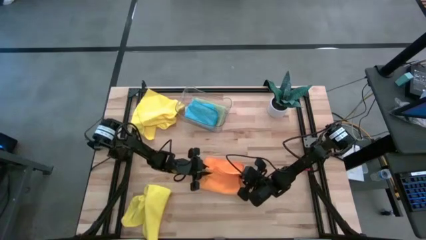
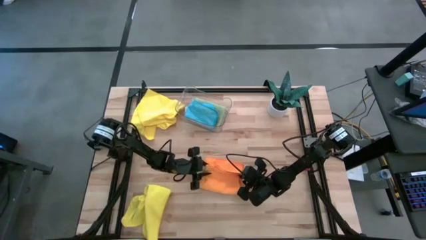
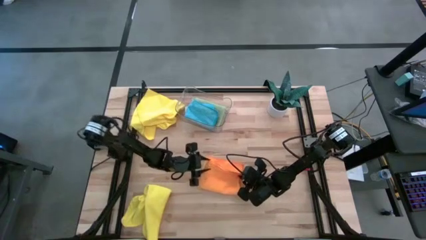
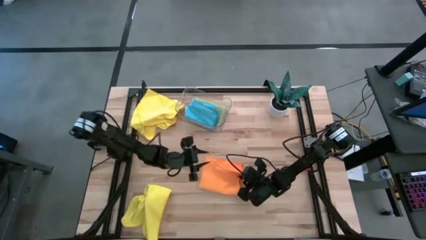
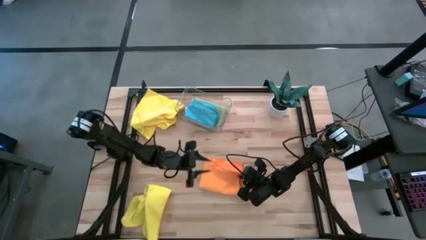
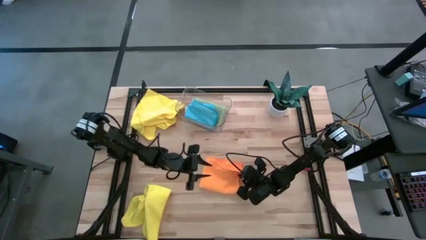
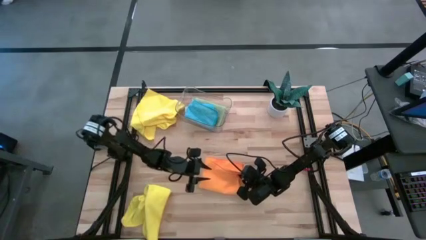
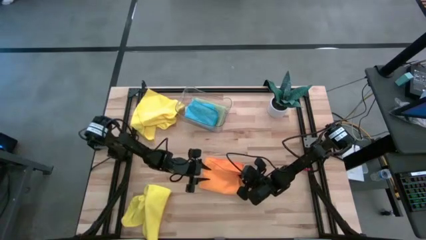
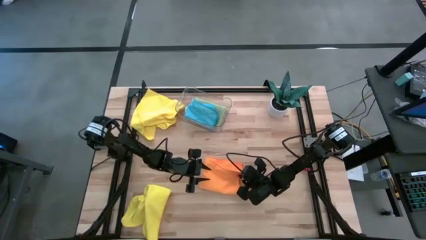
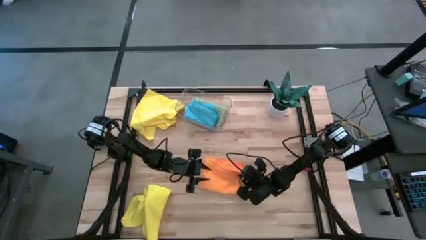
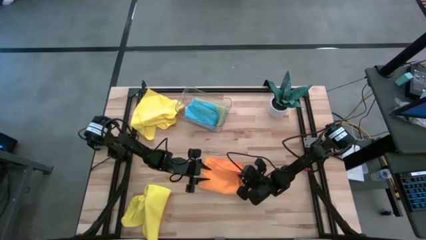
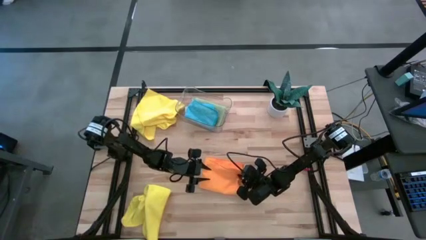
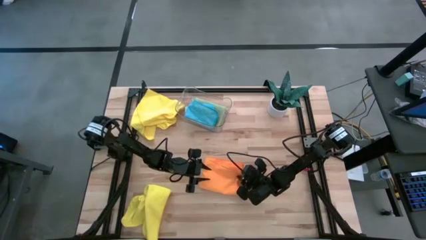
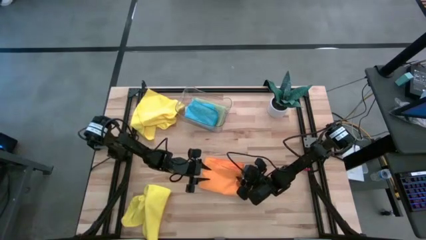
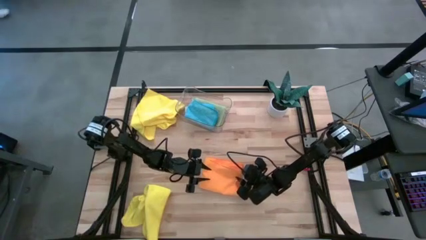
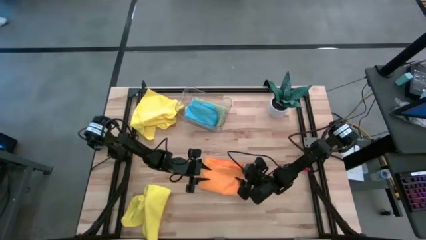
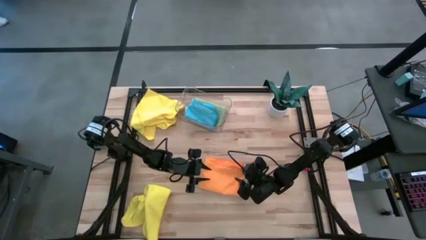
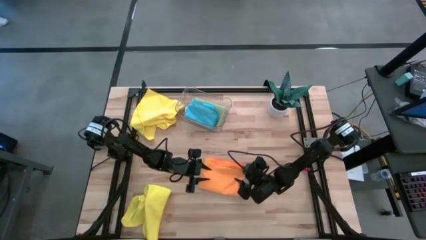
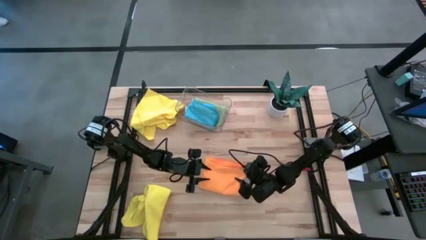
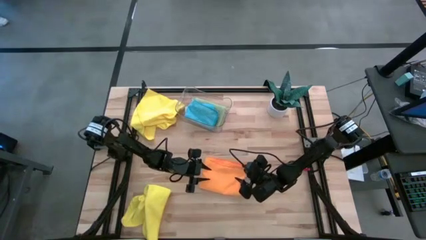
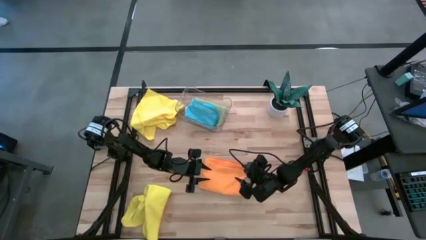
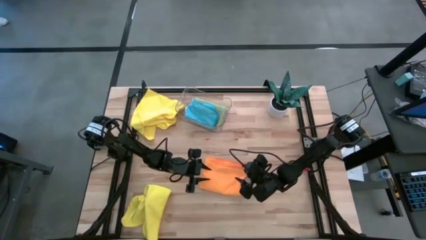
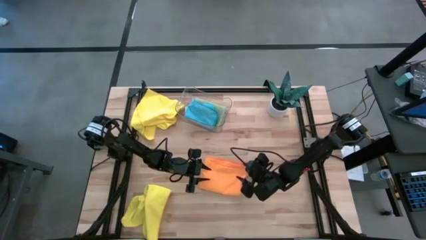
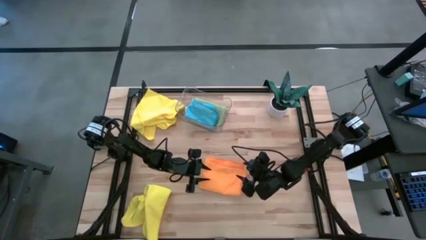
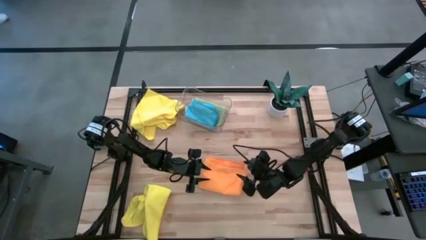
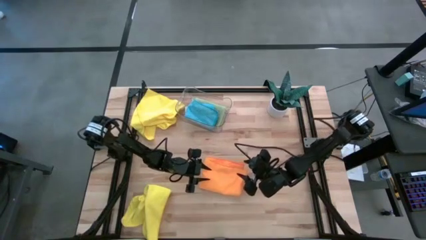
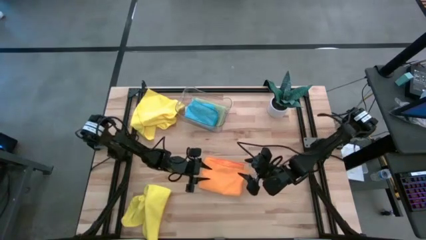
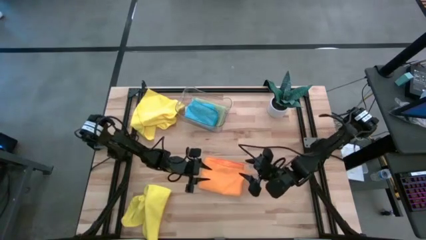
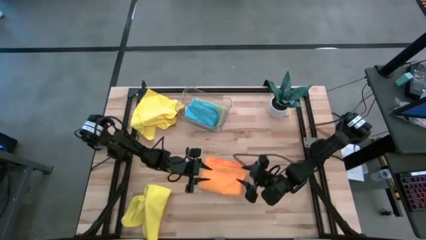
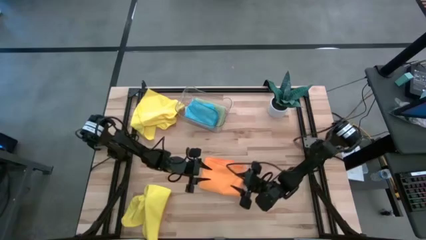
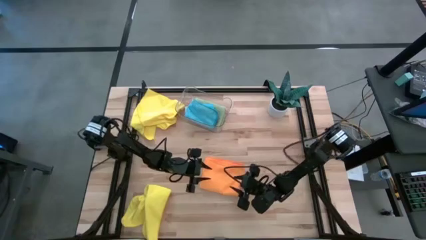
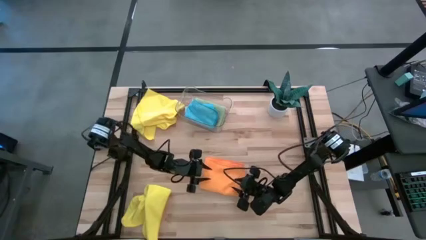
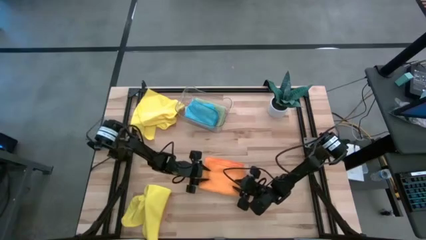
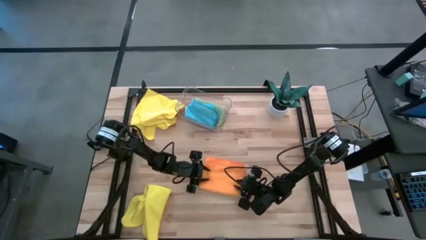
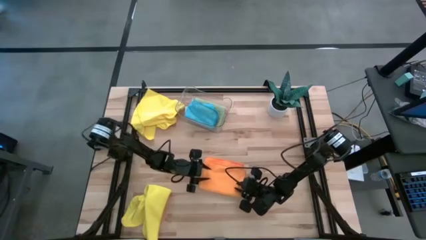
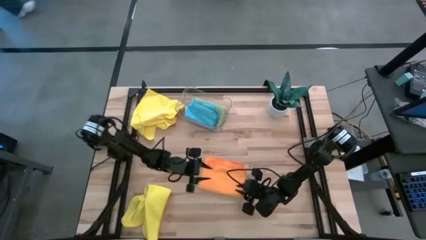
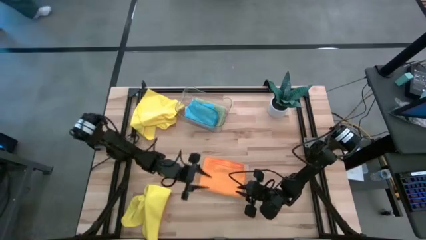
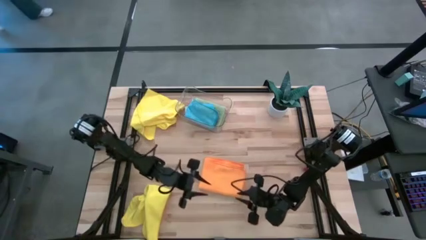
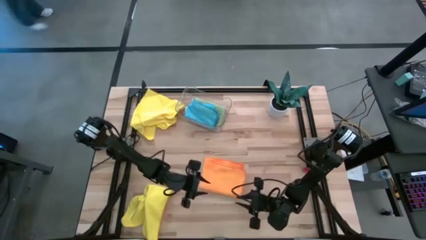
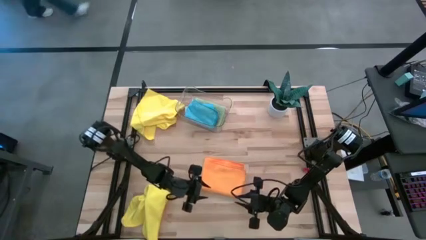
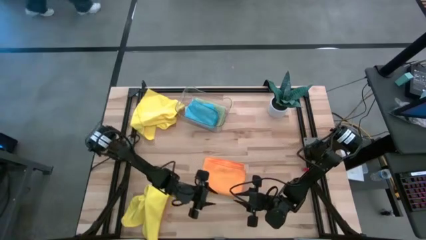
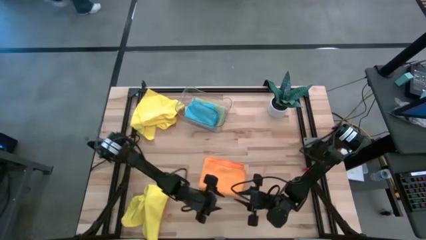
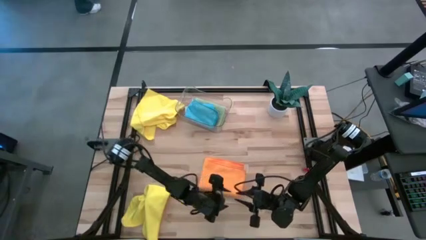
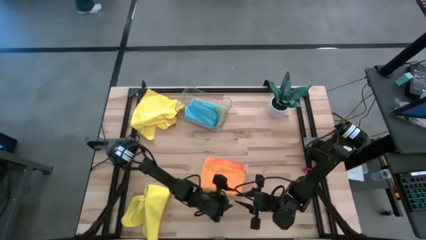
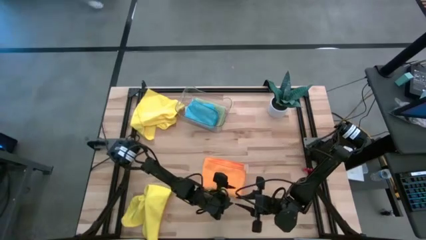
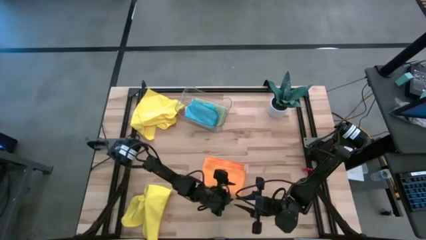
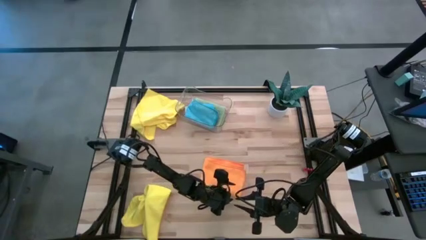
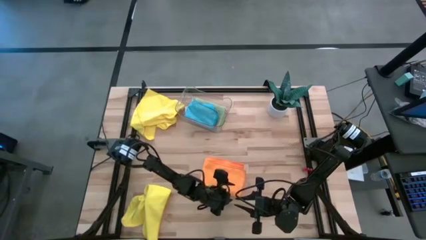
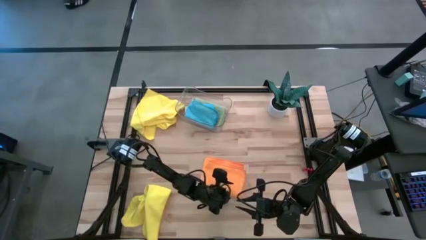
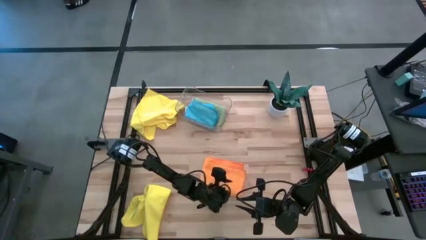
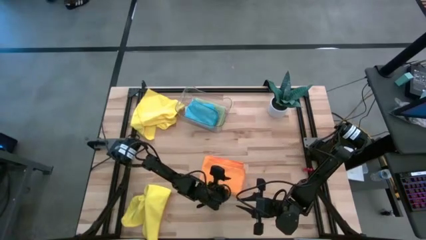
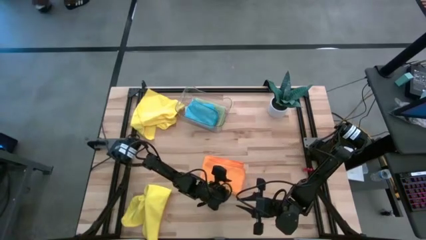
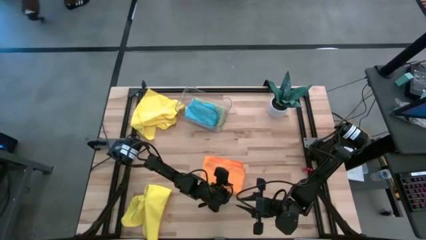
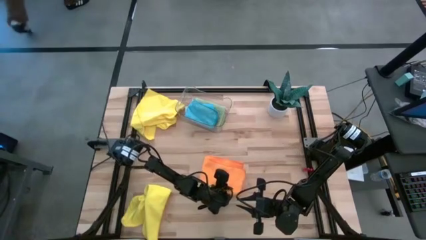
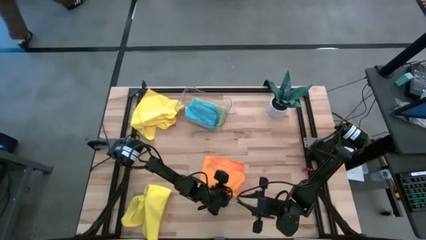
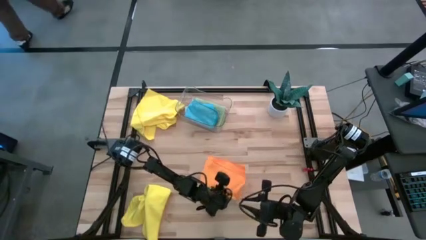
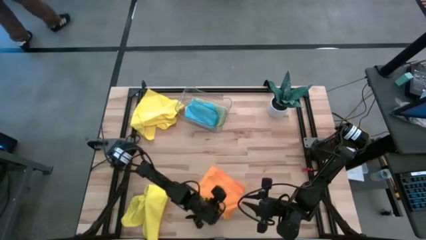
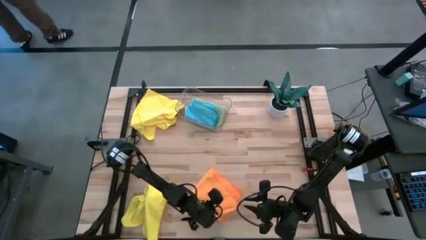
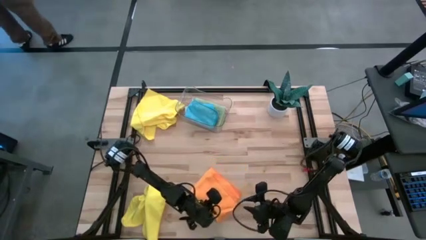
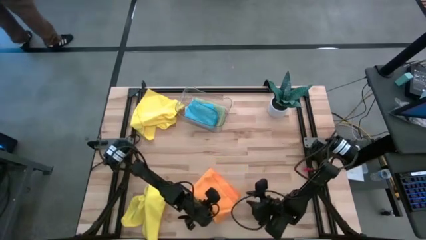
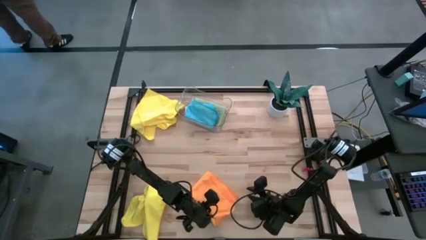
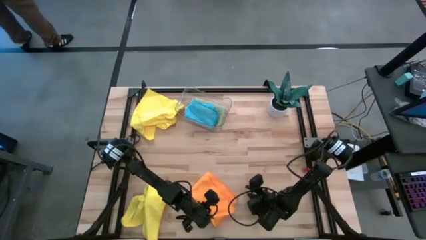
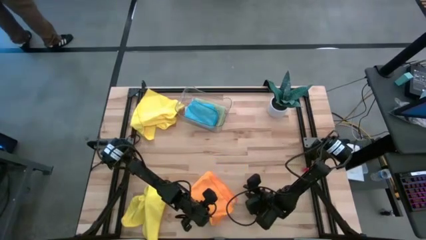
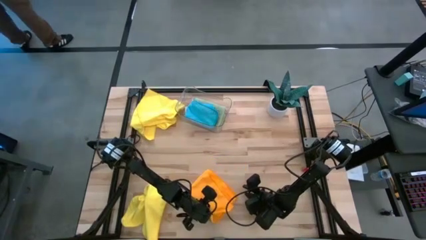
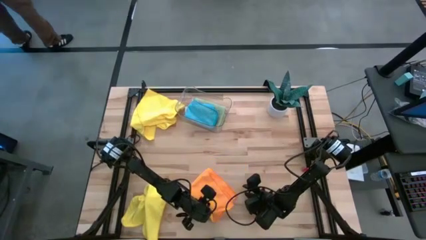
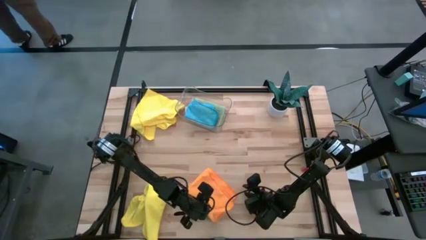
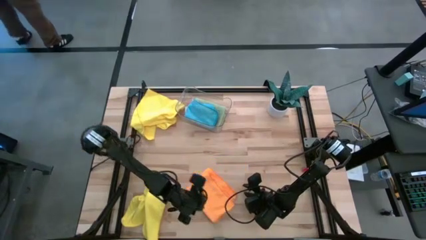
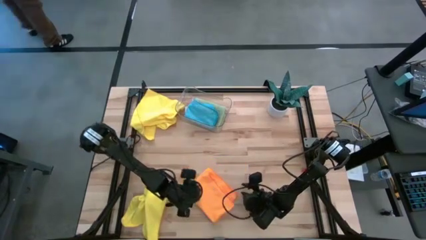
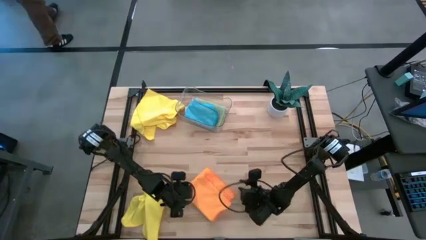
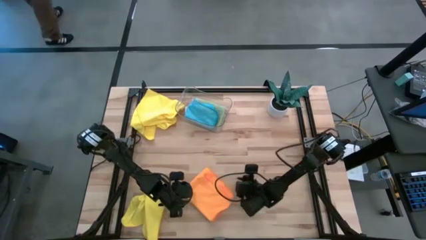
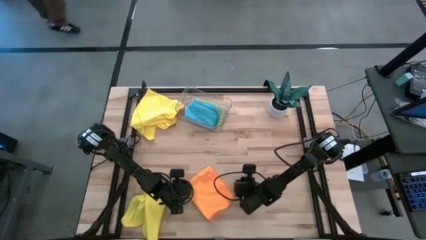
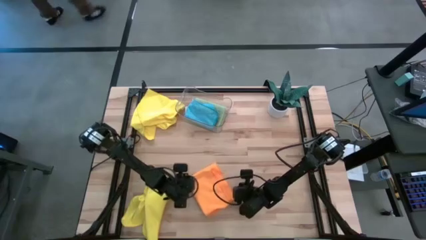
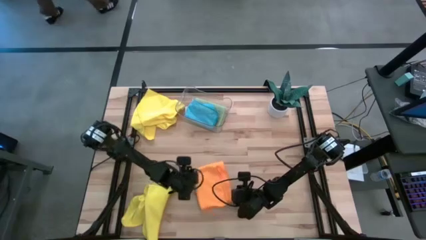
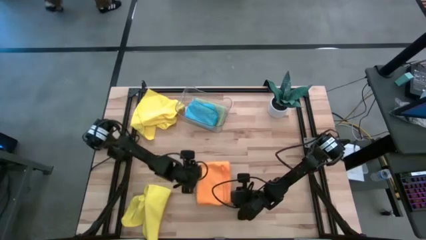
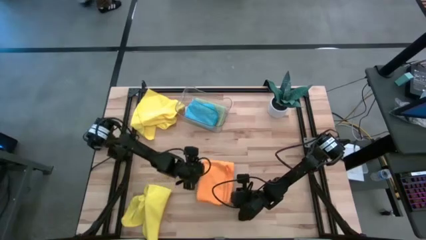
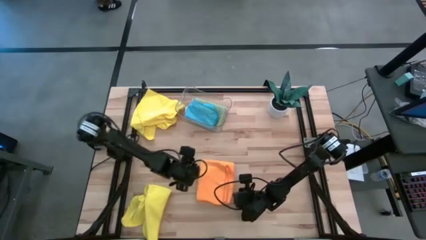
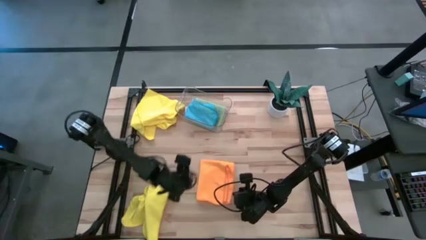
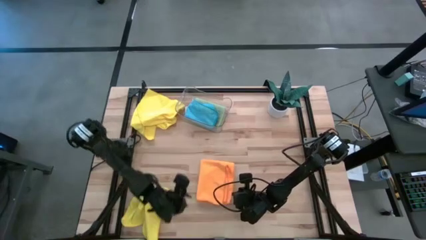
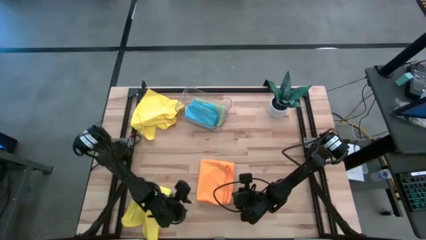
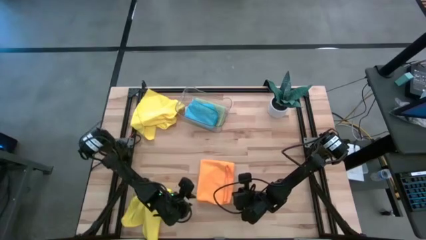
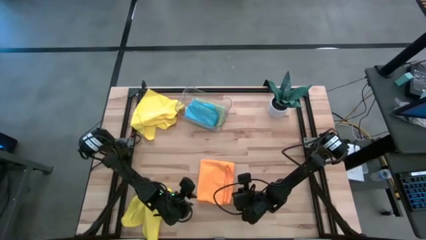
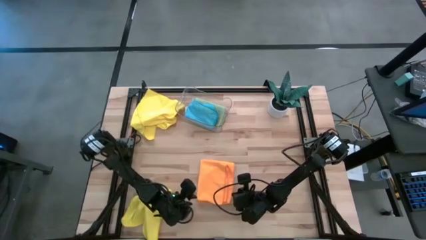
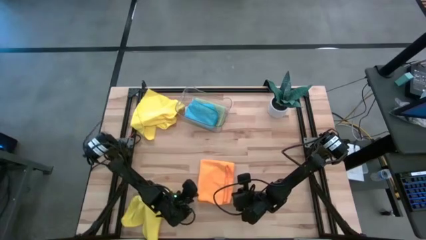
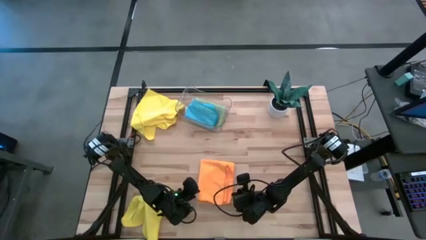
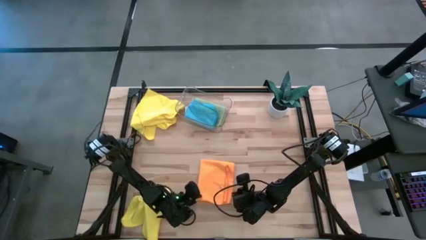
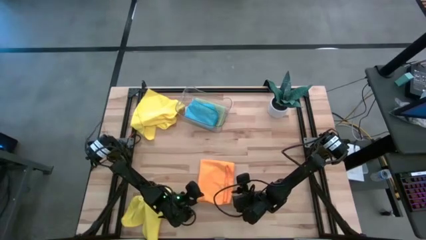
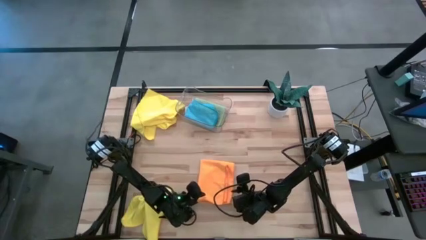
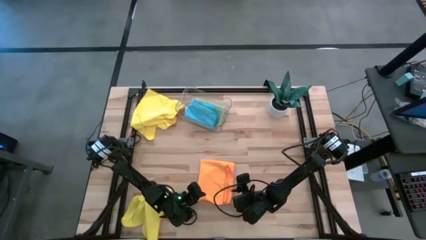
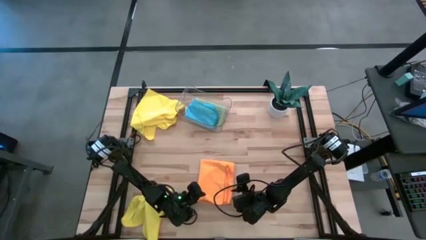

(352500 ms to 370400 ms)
Task: Fold microfiber towels
Fold the orange towel
